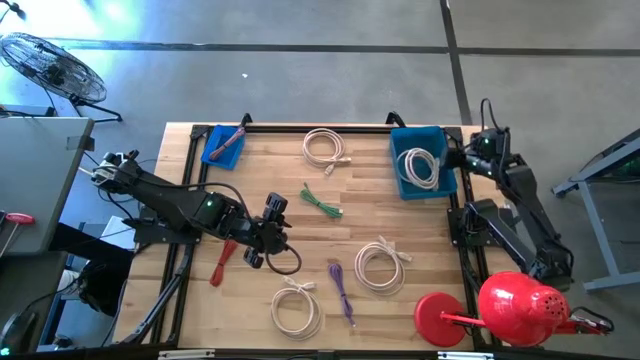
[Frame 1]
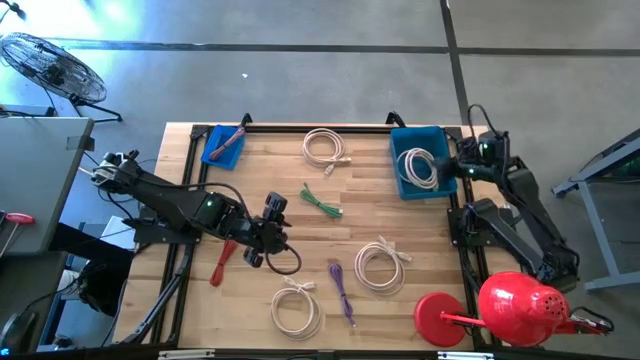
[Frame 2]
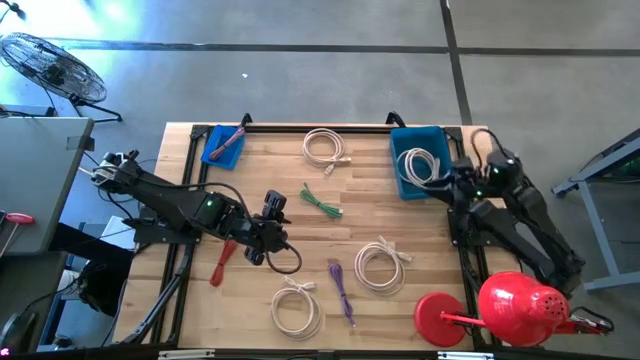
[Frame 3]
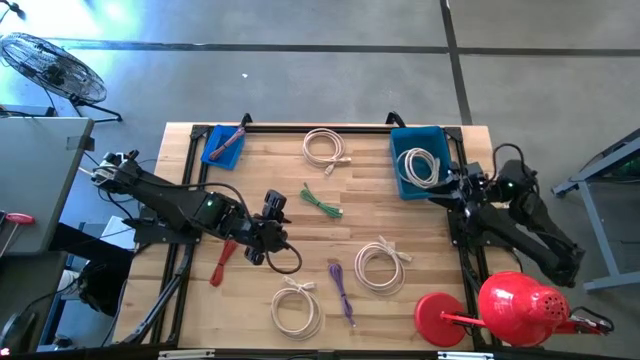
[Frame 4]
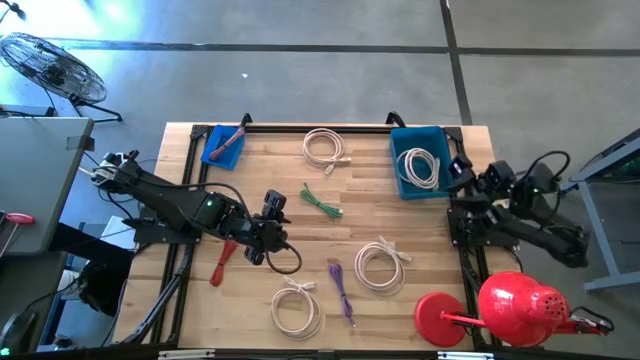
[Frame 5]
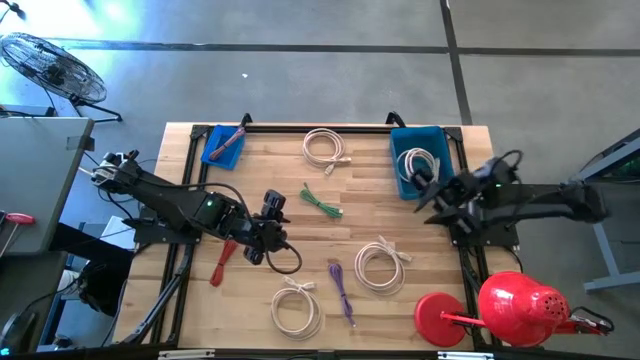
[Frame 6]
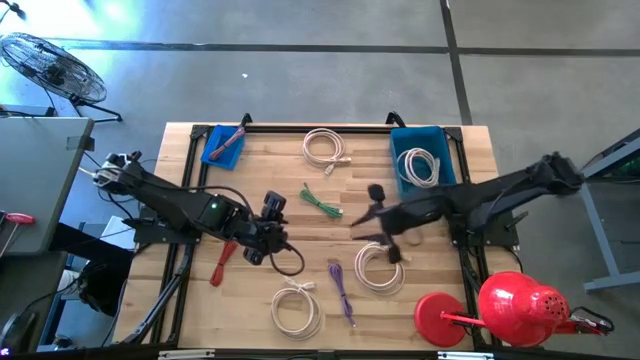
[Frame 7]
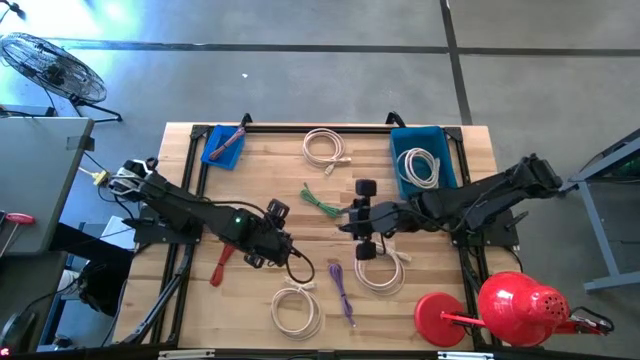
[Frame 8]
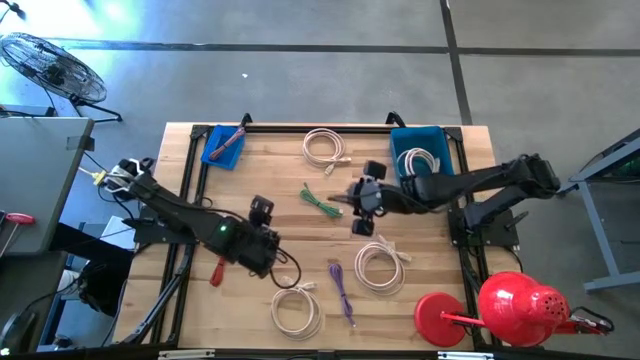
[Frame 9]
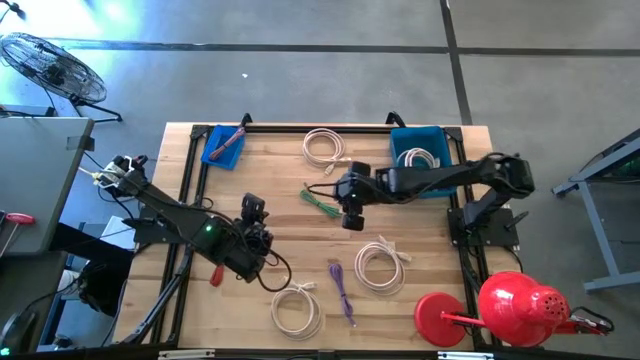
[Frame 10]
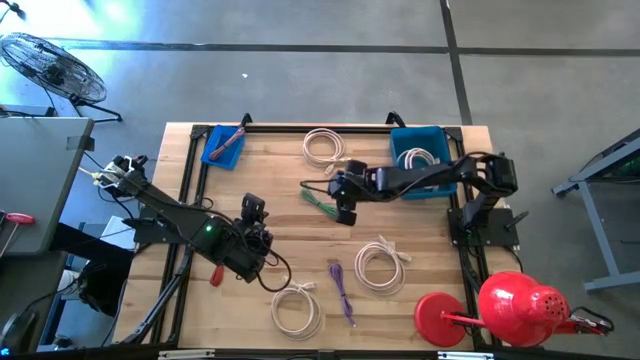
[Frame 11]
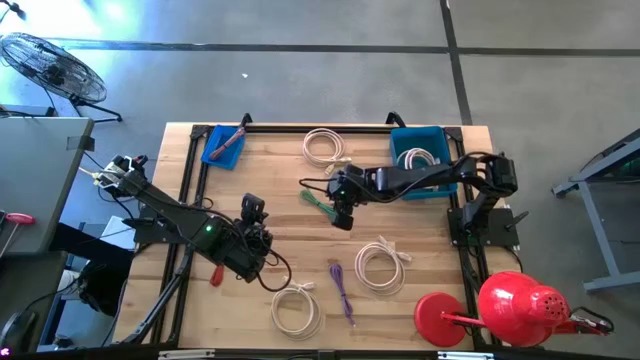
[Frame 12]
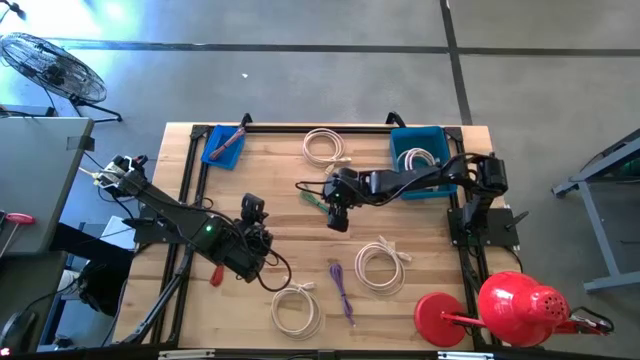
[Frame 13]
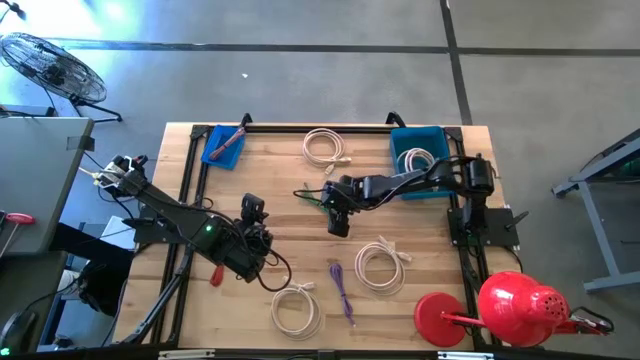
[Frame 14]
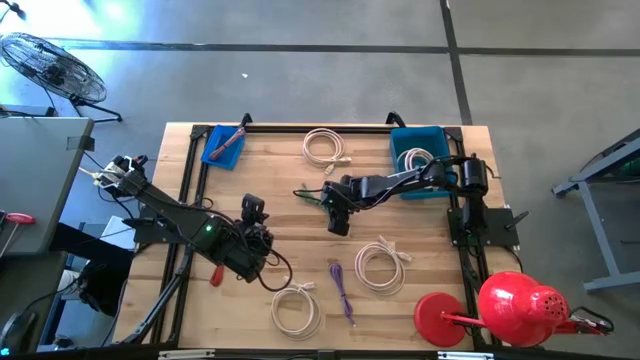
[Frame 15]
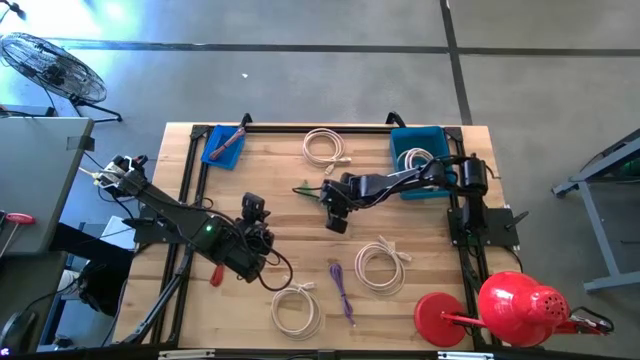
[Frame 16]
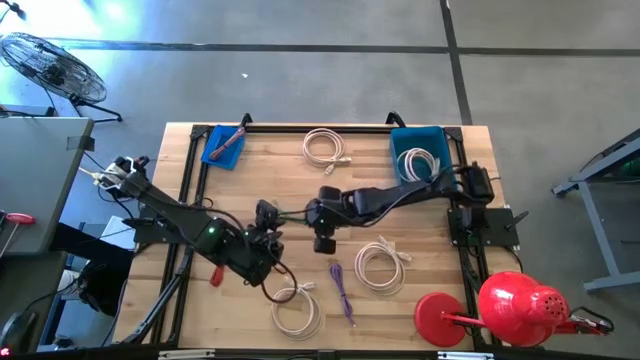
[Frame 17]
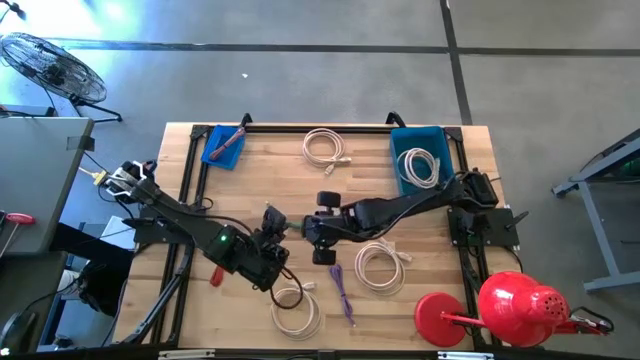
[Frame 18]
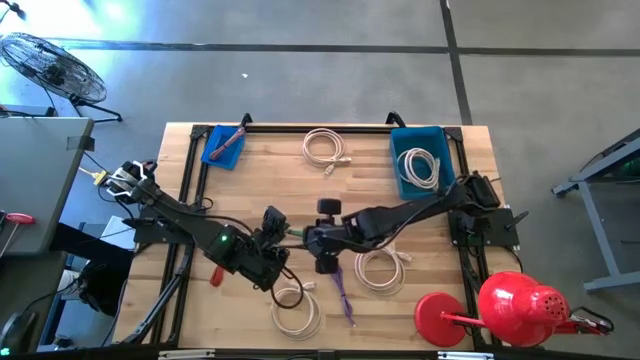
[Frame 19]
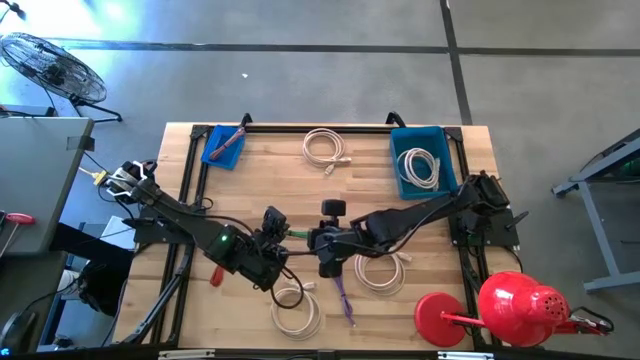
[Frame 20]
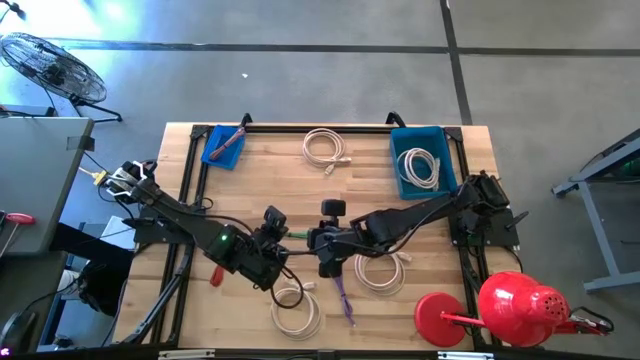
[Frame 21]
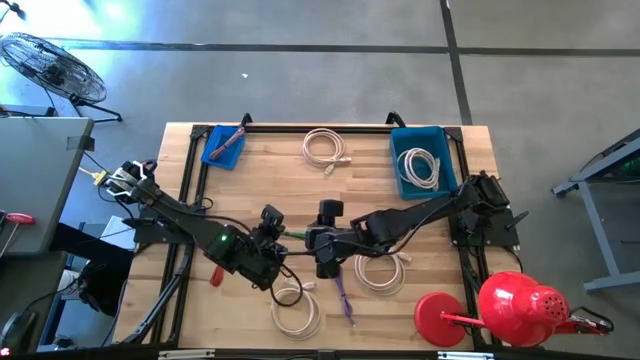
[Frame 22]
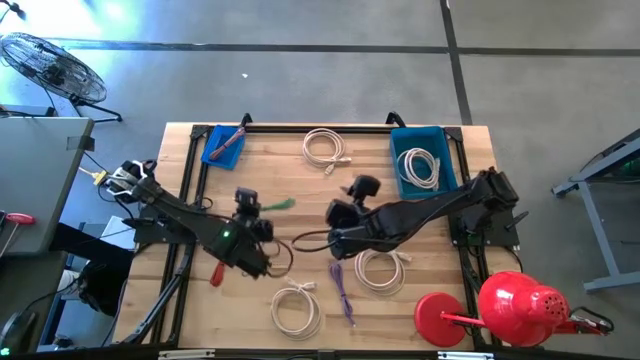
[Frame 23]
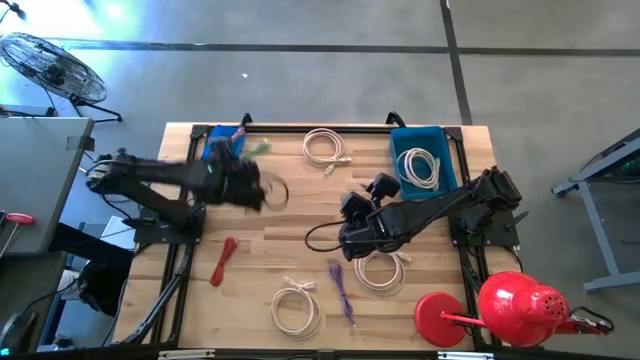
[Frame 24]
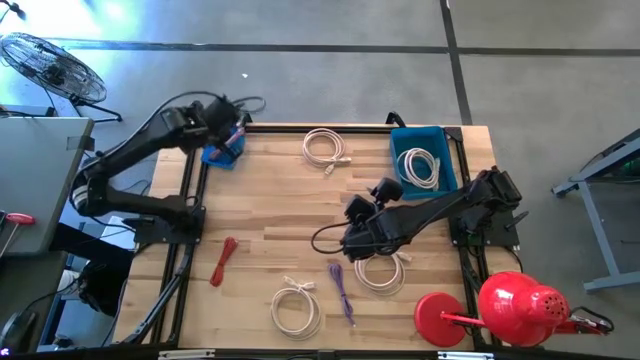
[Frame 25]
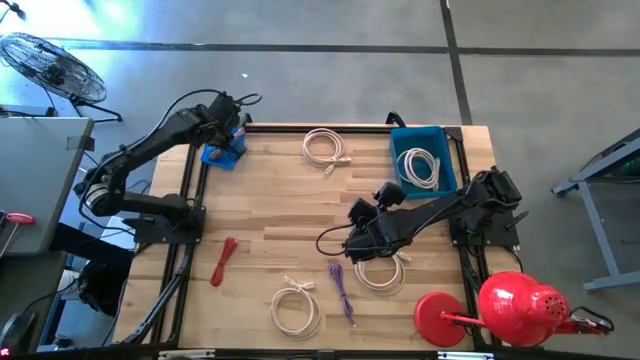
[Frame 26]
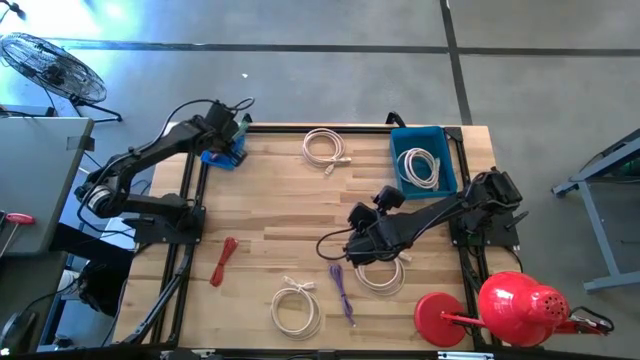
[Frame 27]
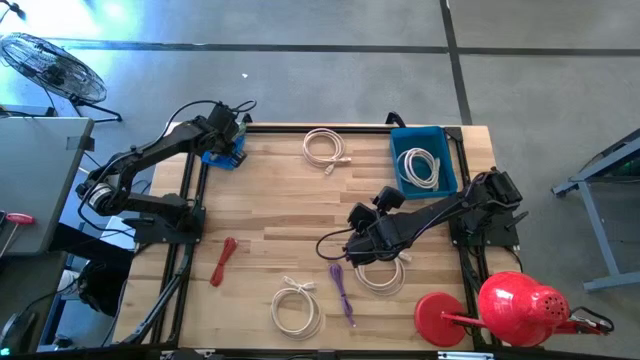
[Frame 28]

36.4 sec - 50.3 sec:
Task: Pick & Place USB Port
Put the green USB cable into the left blue bin

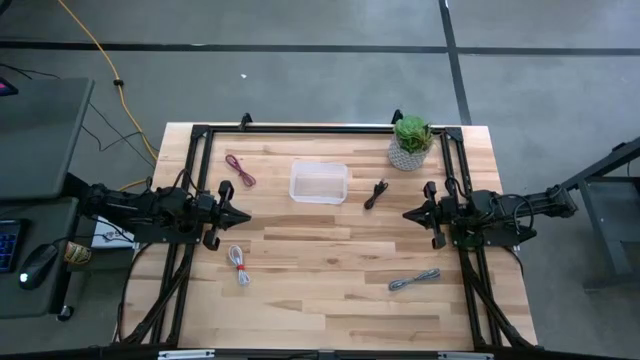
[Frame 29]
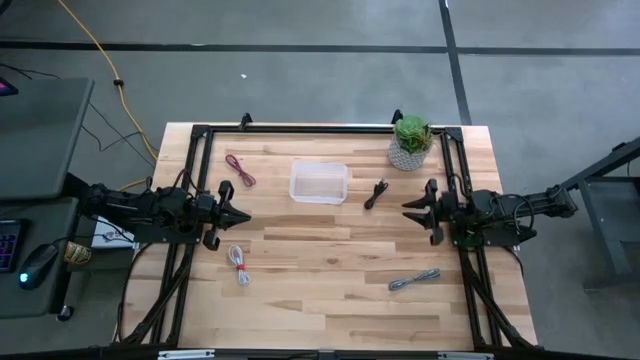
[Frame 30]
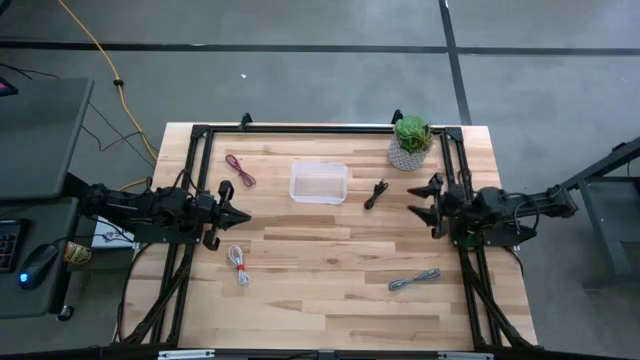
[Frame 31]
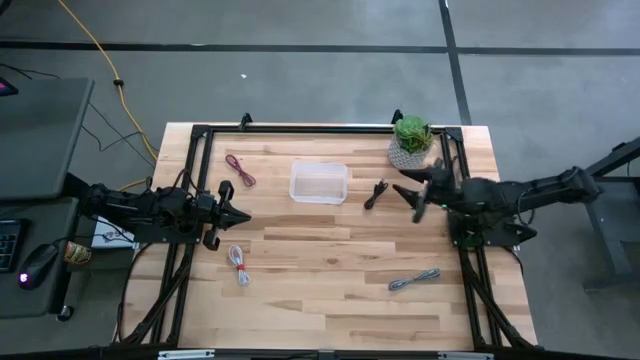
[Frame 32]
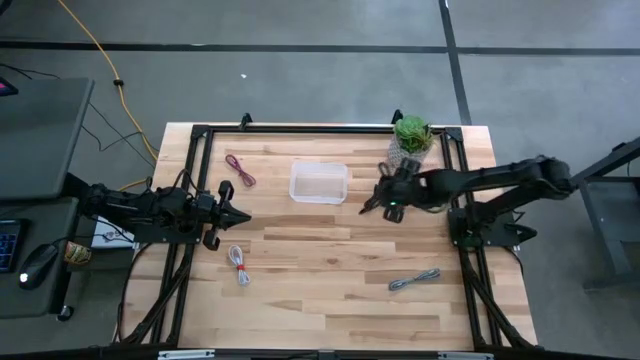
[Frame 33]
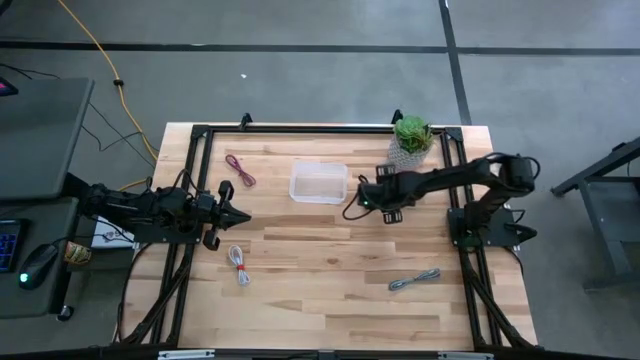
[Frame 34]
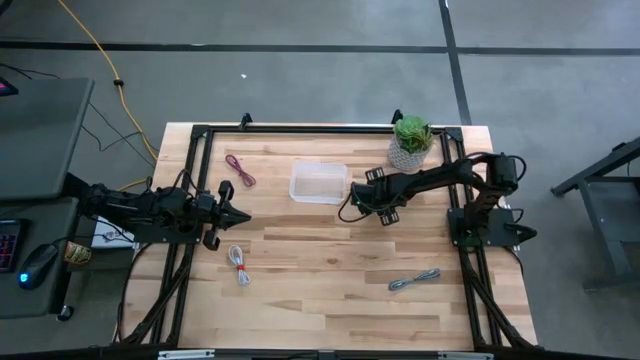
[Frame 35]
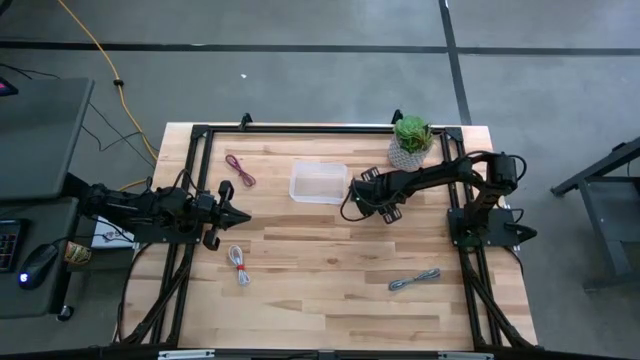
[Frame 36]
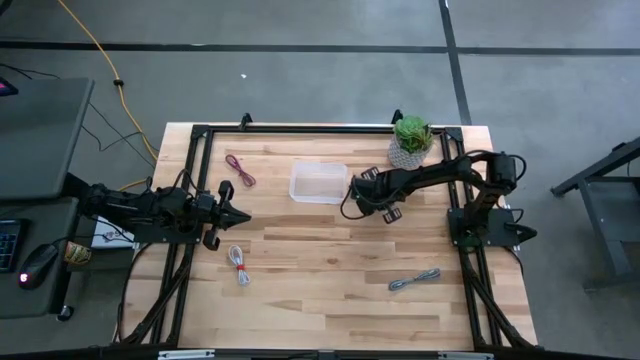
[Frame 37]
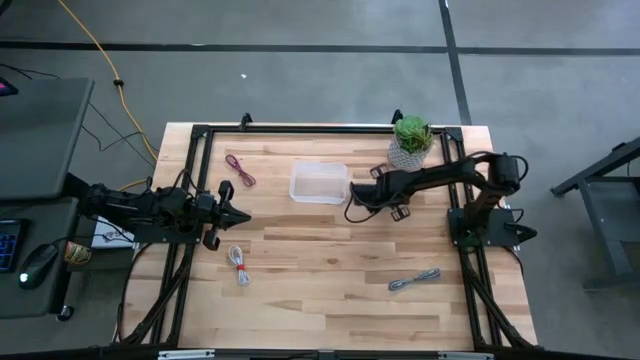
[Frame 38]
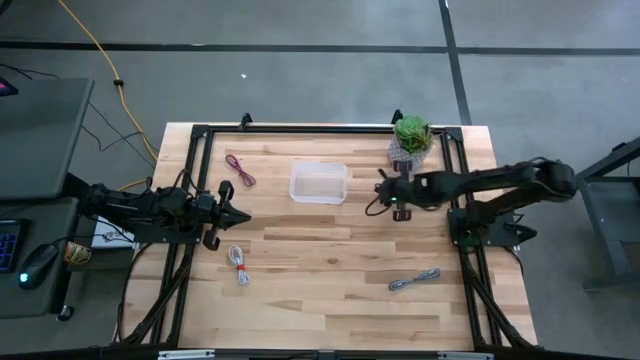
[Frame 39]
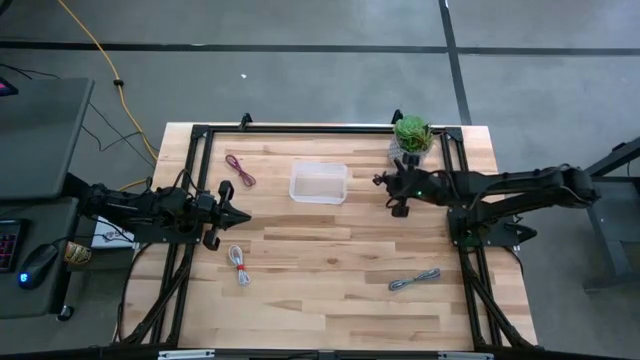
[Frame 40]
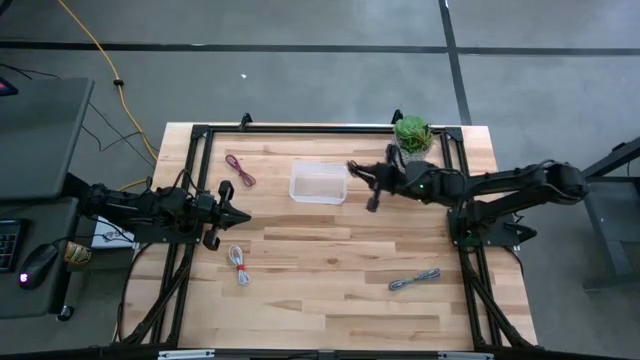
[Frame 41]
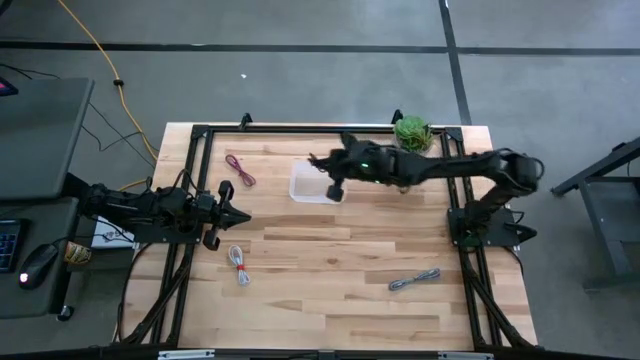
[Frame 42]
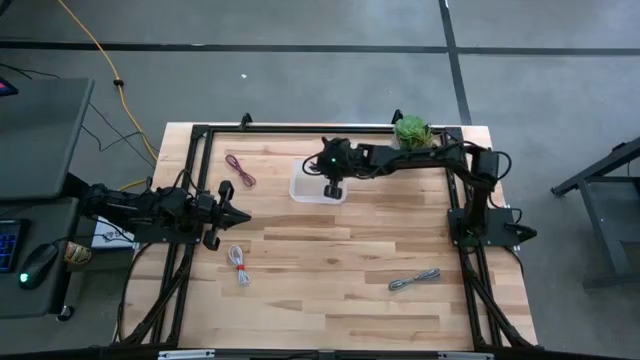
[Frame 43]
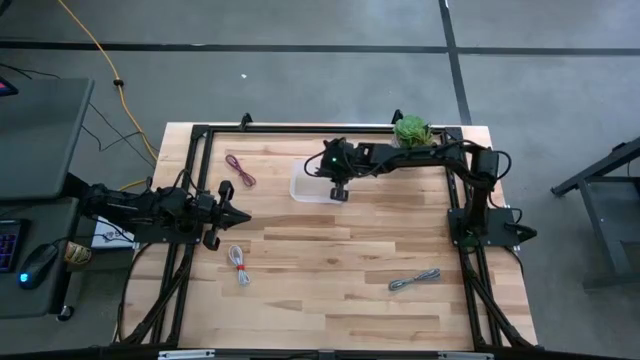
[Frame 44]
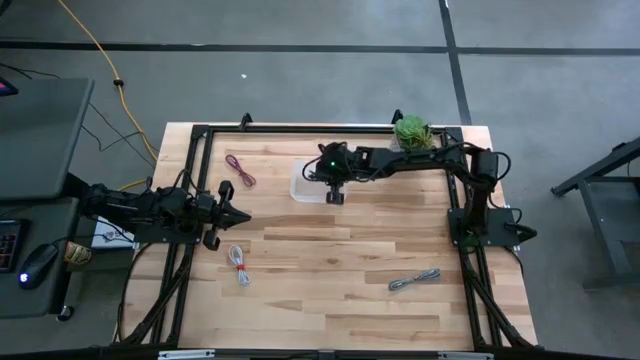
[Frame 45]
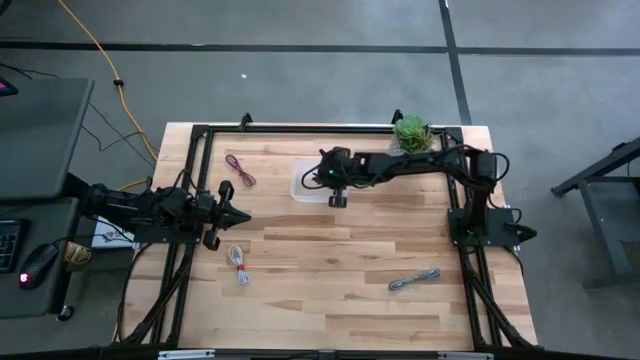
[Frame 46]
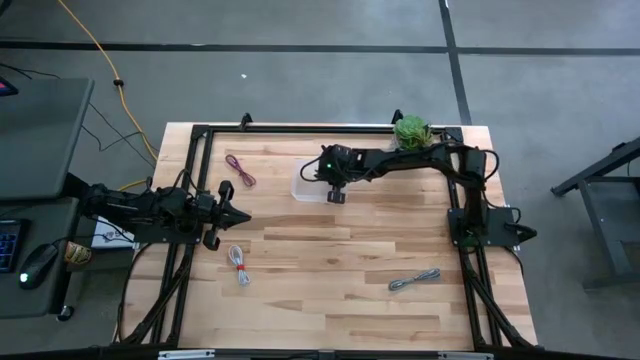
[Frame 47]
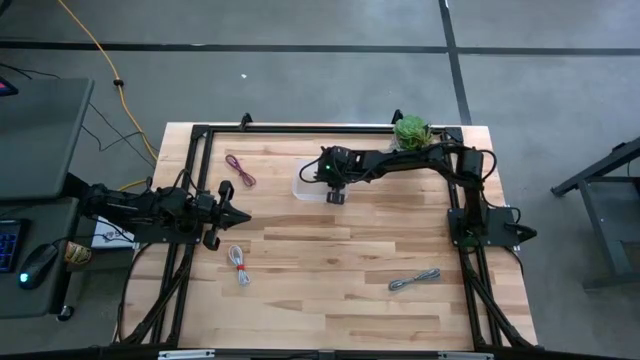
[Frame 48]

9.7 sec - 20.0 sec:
Task: Pick and place USB-C Cables
Put the black charger cable into the transparent bin
